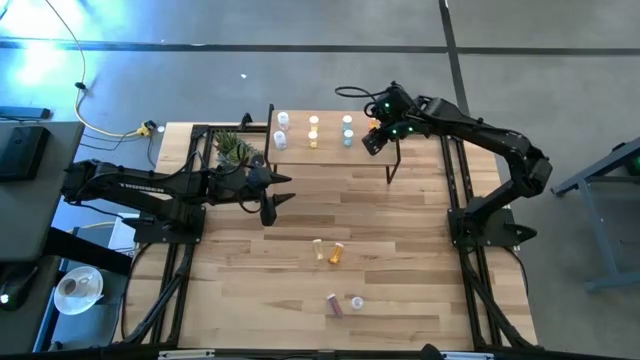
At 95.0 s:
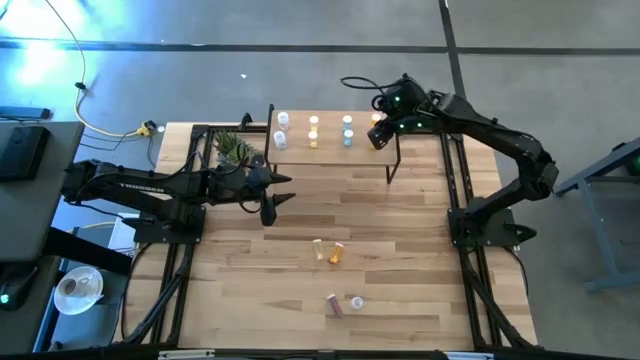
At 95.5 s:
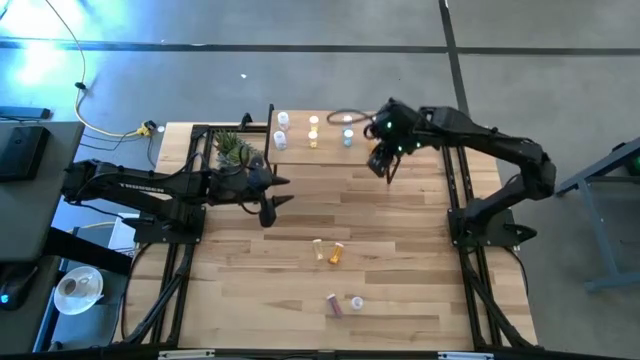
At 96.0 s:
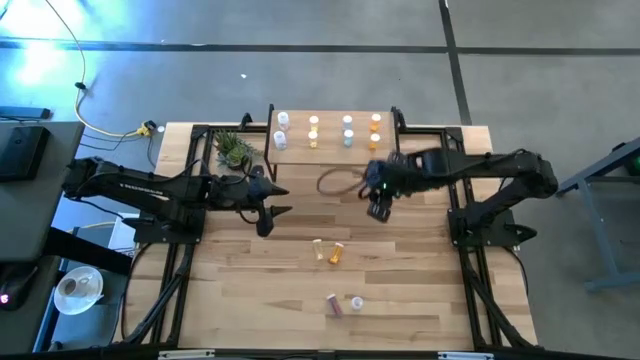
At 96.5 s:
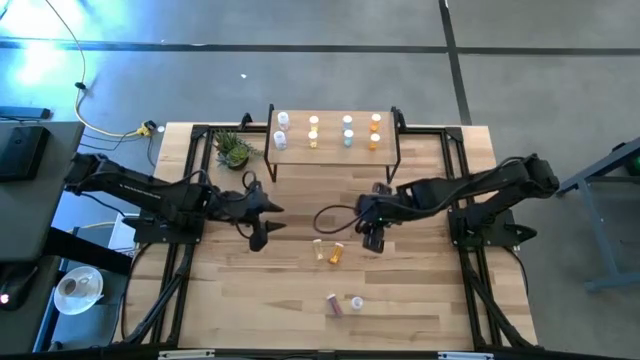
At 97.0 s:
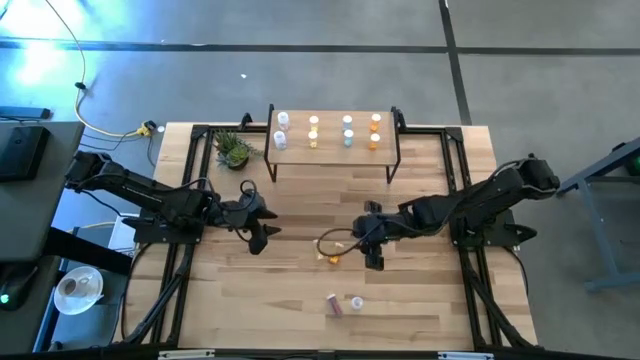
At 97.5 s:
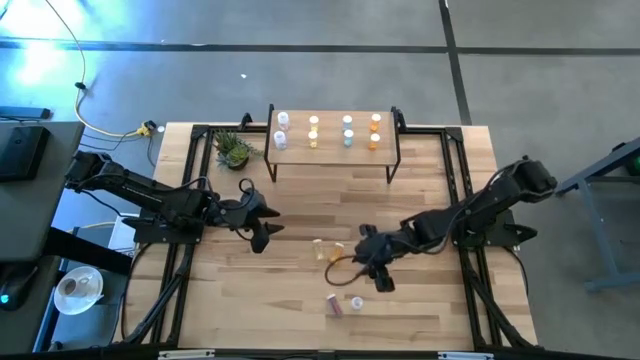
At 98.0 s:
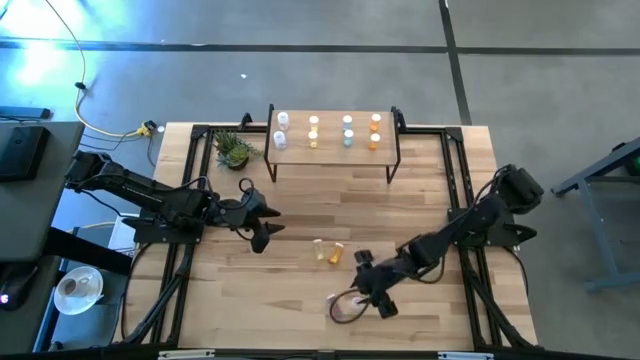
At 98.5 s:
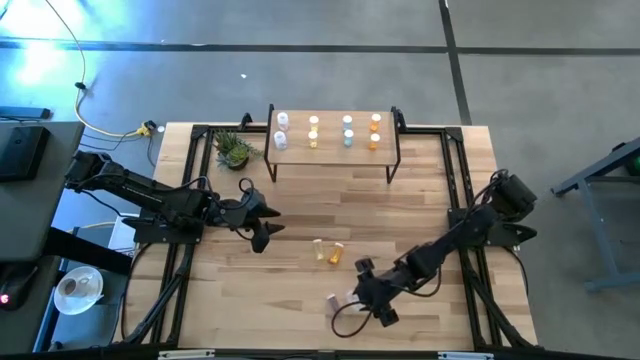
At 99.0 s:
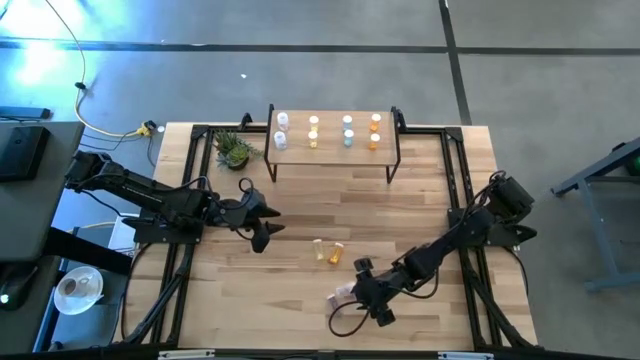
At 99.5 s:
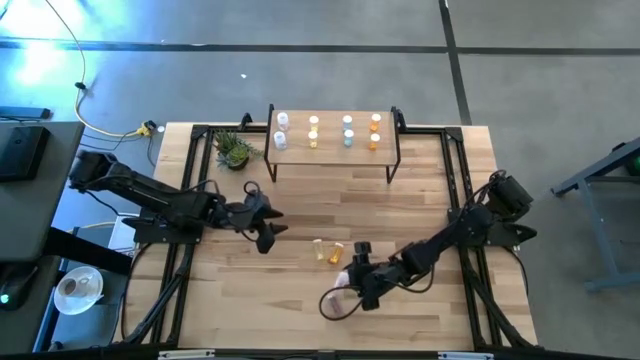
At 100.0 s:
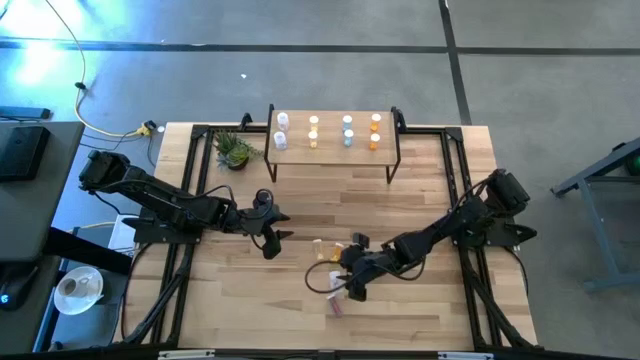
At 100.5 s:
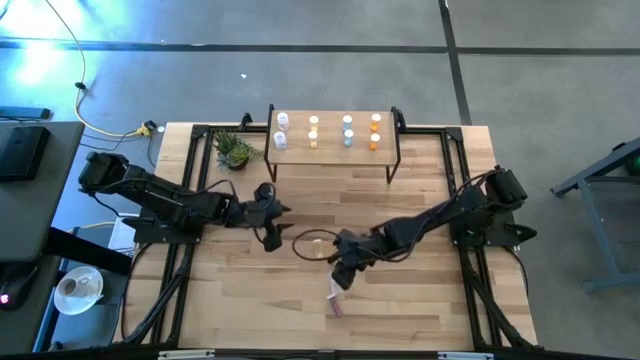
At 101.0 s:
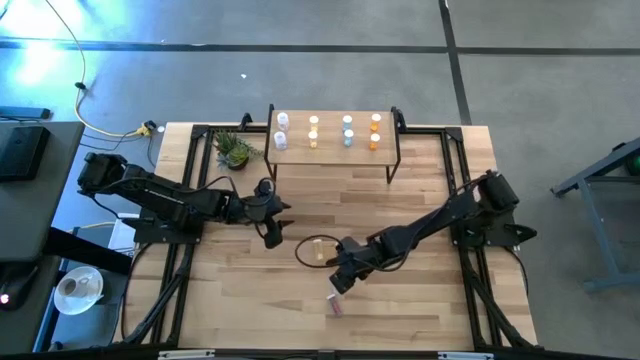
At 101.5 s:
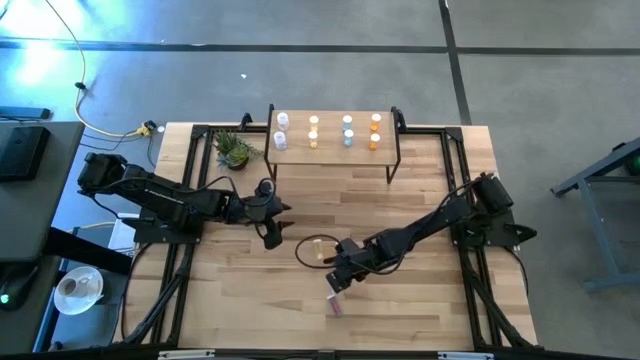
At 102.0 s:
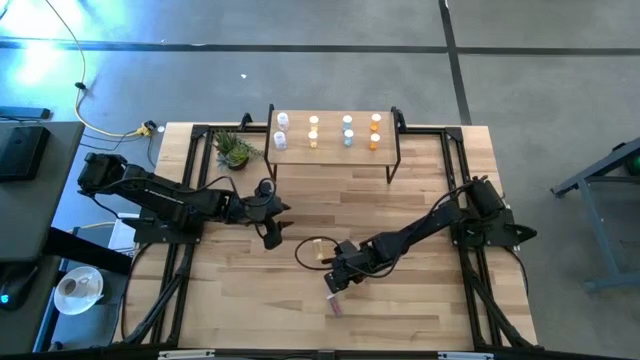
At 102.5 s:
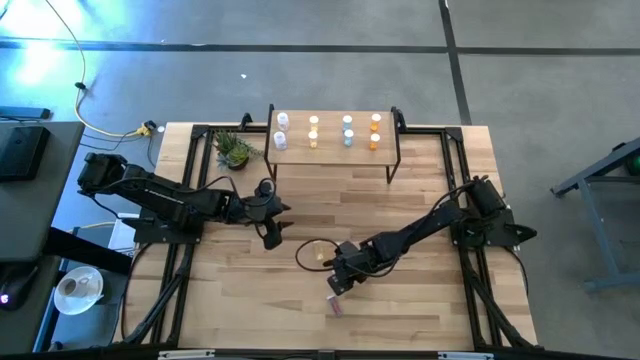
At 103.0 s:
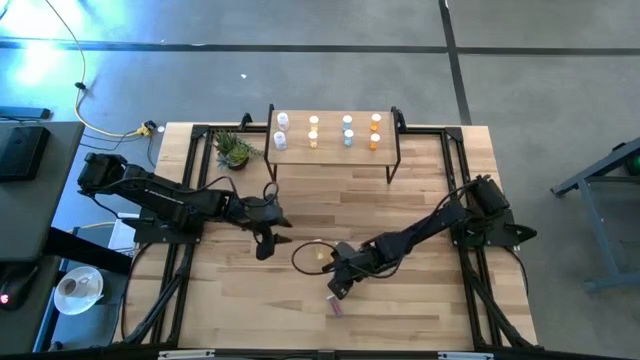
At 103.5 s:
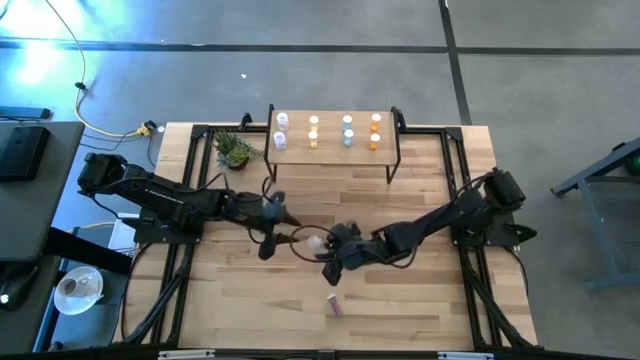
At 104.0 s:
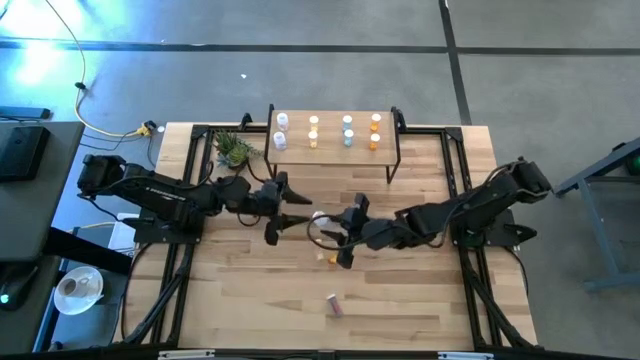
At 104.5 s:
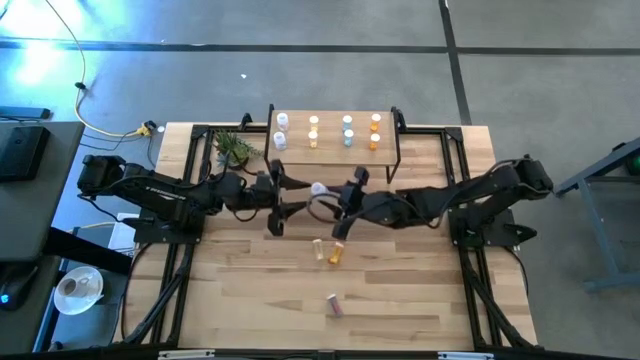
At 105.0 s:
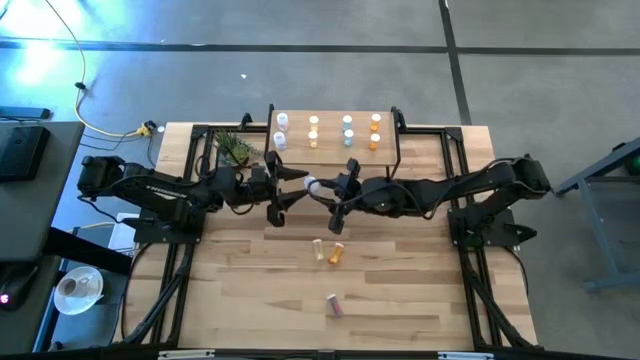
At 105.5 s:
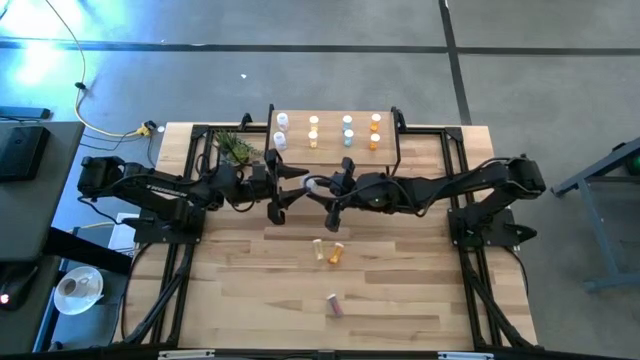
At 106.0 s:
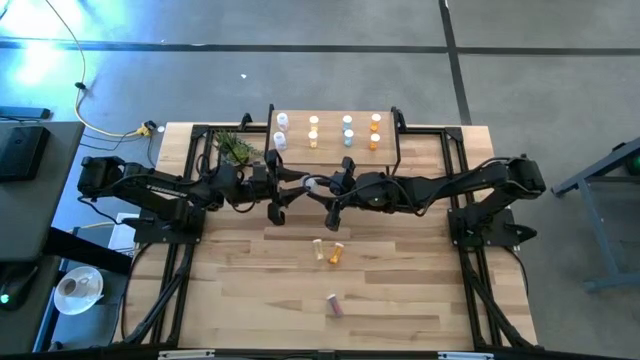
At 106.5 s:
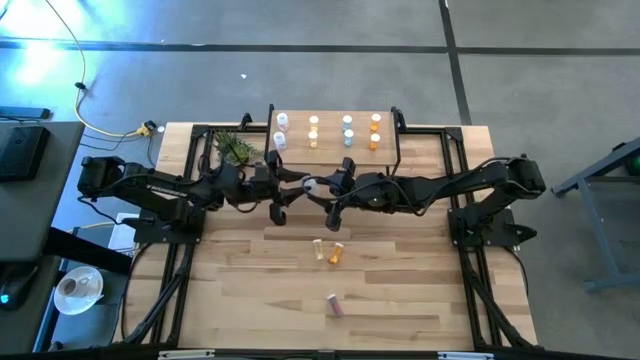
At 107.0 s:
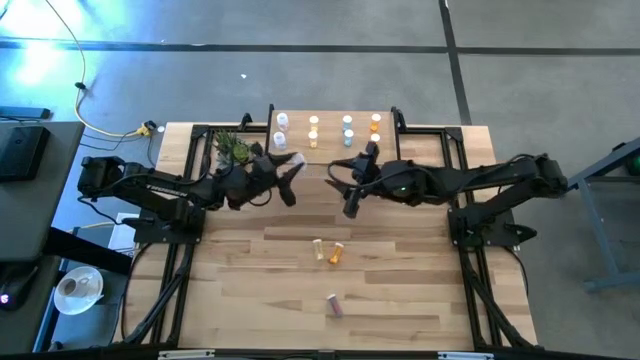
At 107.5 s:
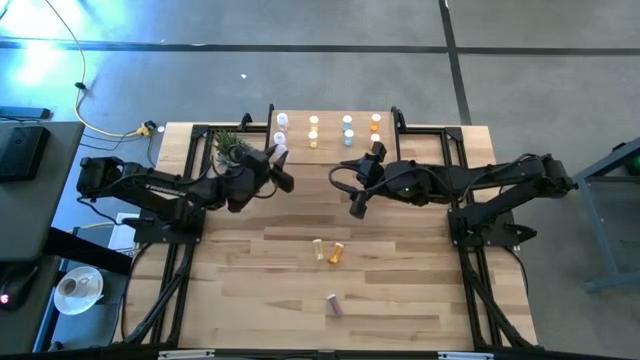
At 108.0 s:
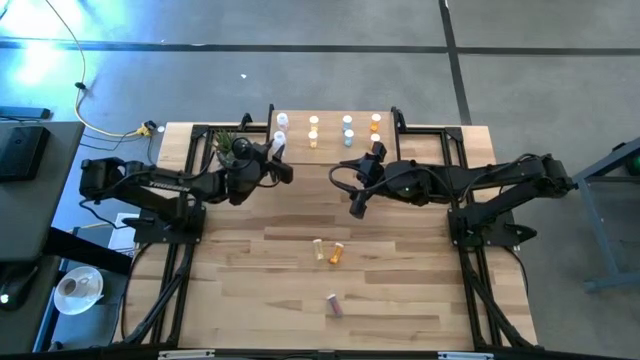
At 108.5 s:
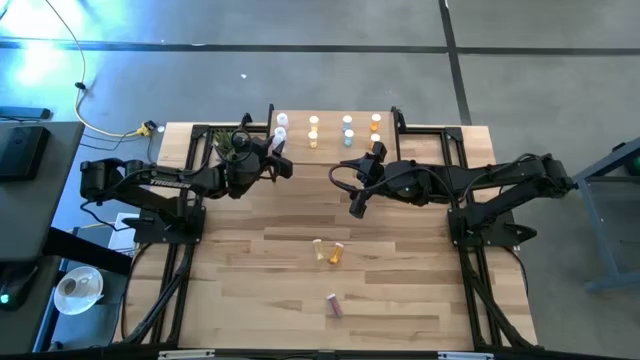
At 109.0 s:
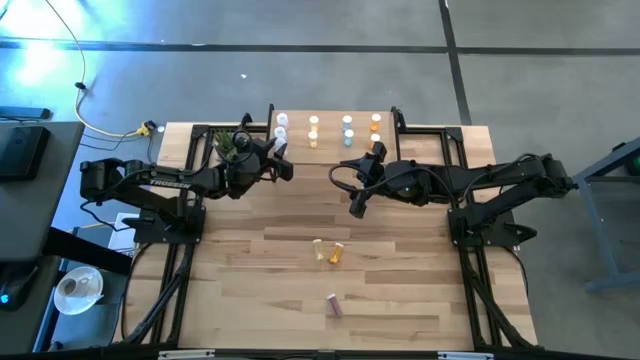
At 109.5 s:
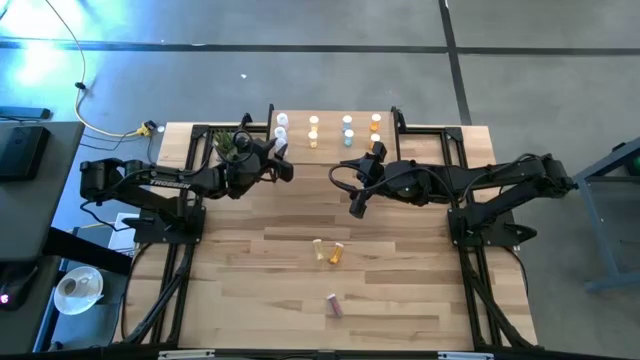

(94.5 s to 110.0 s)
Task: Pick and place medicine bottles onto shelf by color
Put the transparent pill bottle aligned with the other transparent pill bottles on the shelf

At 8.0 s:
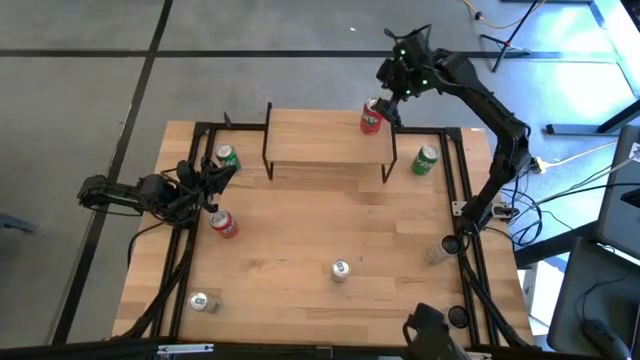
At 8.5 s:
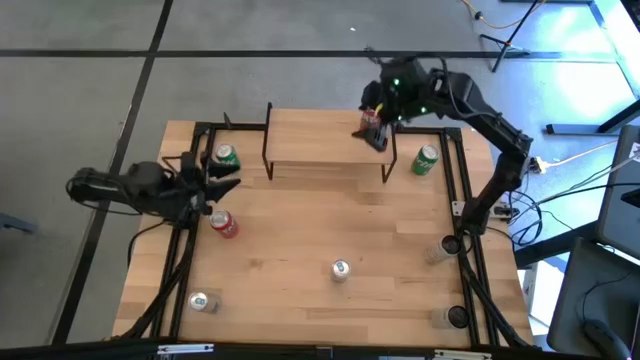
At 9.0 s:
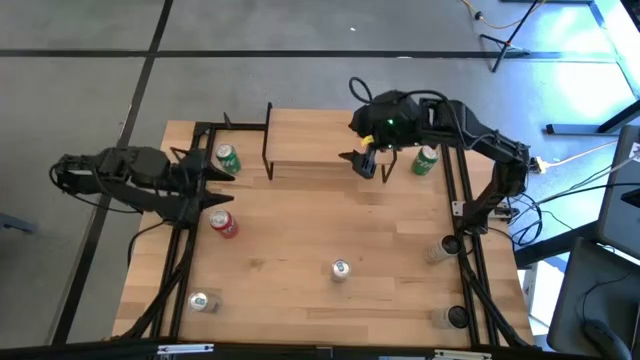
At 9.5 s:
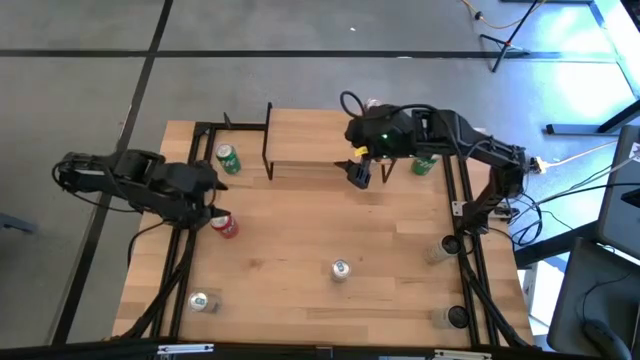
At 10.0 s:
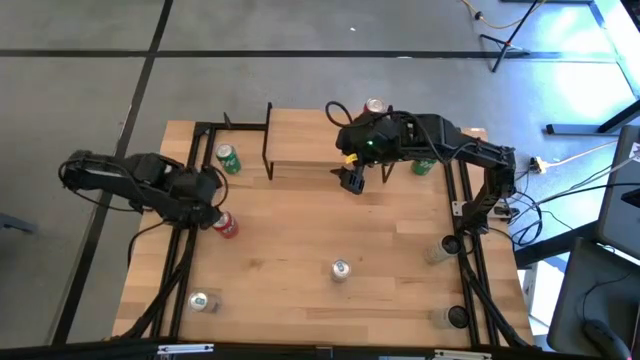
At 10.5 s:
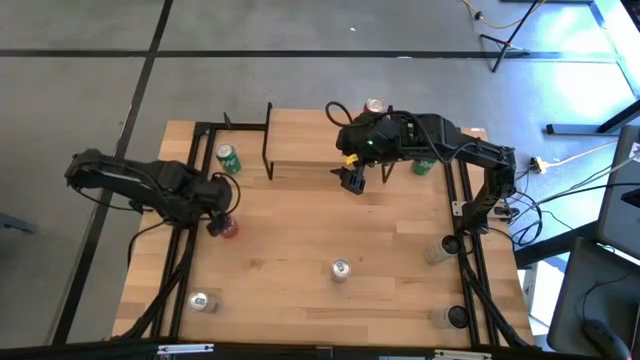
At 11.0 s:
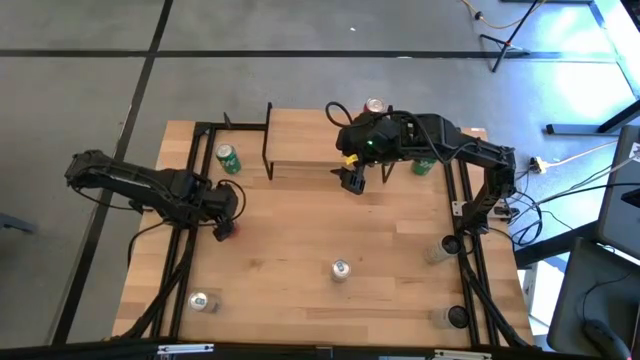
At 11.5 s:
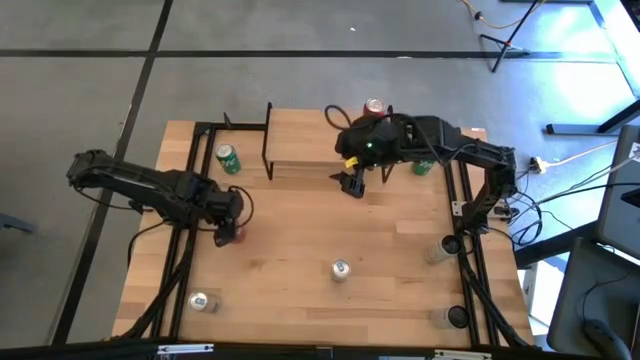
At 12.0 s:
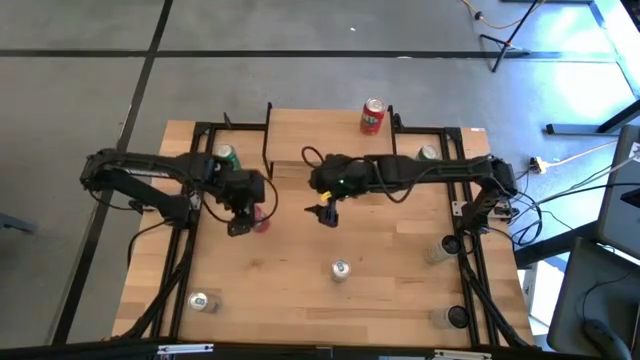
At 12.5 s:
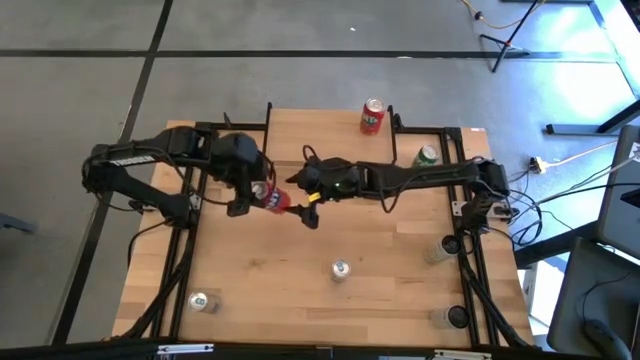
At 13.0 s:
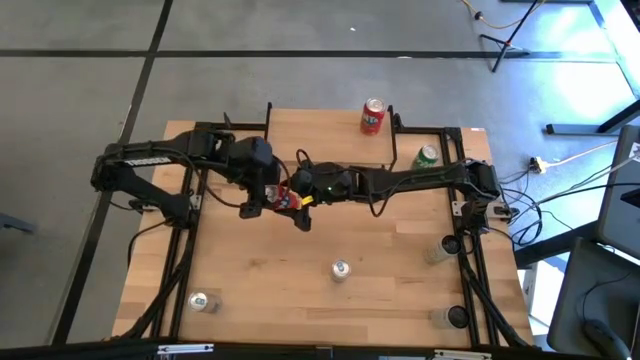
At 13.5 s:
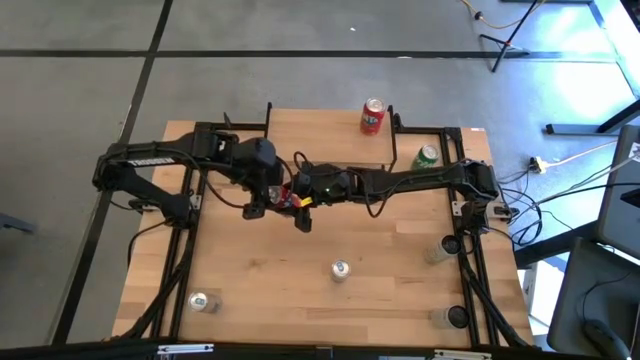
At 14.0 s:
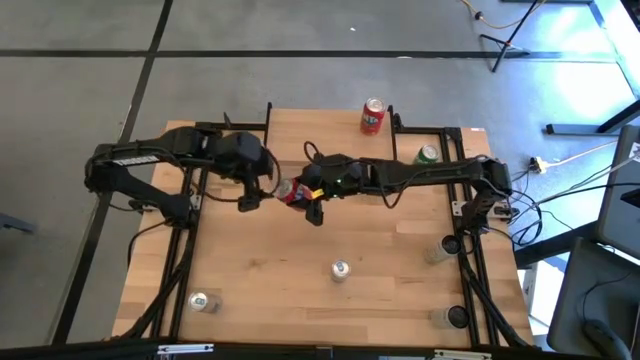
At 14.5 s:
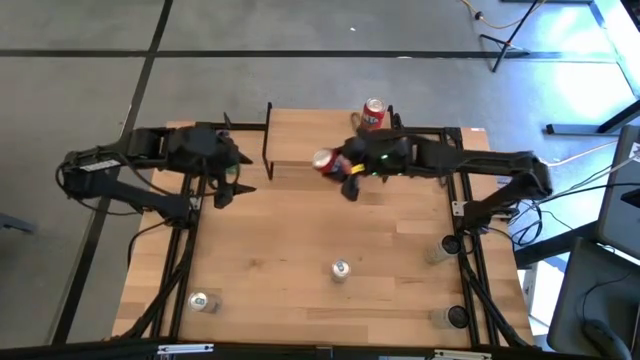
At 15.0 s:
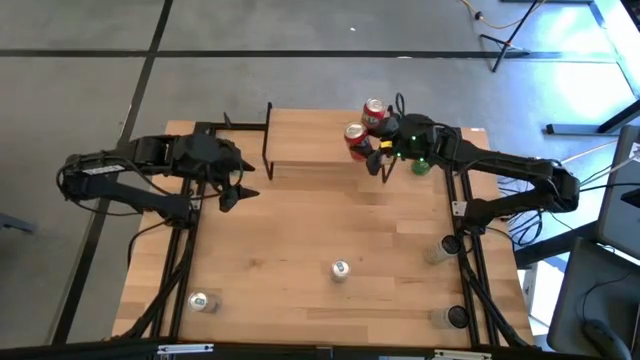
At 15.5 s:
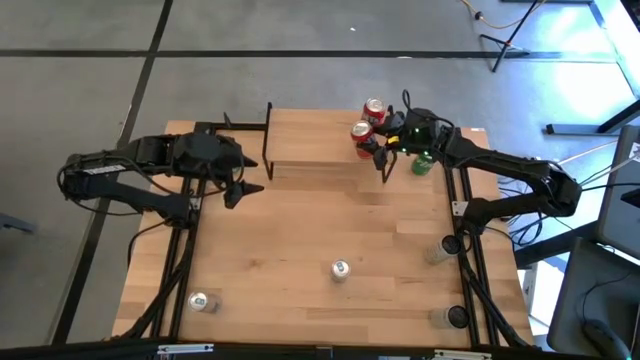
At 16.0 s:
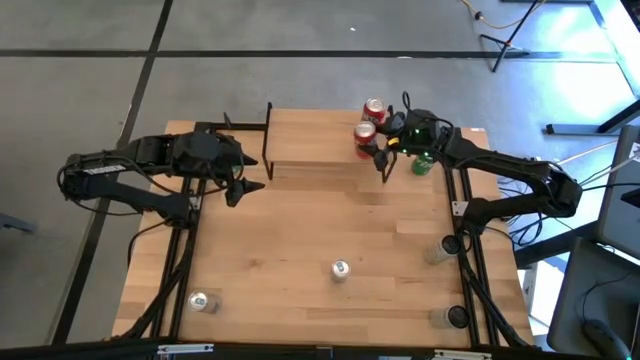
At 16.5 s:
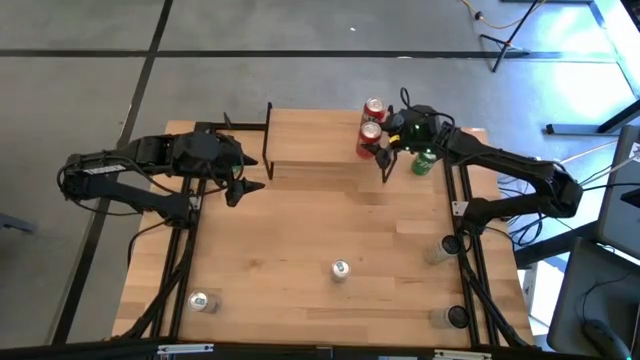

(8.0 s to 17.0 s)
Task: Place canned beverage on shelf
Put the red soda can on the shelf aligned with the other red soda can
